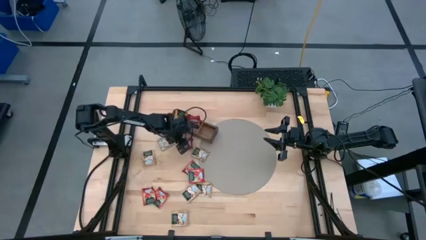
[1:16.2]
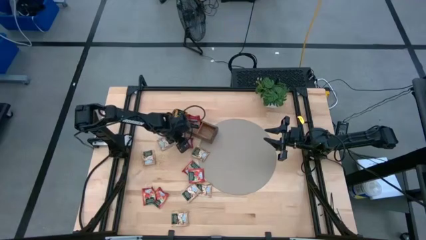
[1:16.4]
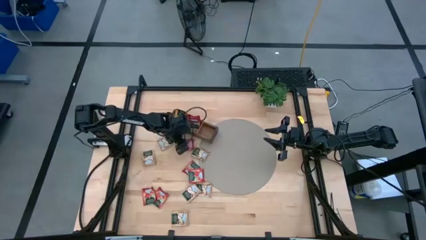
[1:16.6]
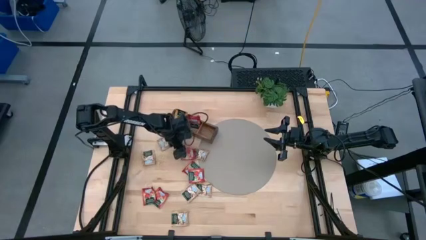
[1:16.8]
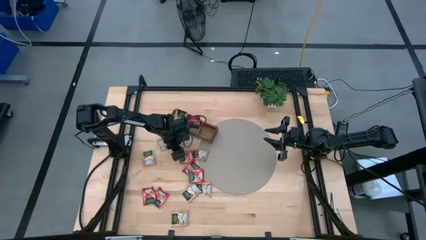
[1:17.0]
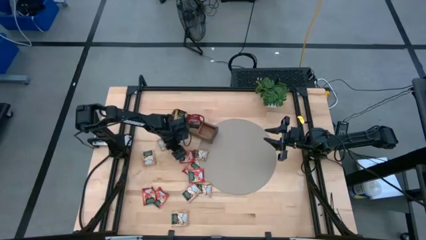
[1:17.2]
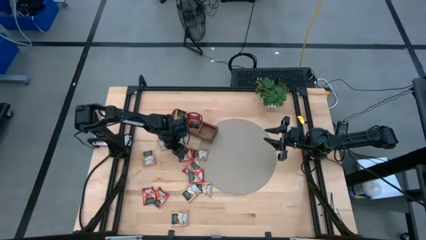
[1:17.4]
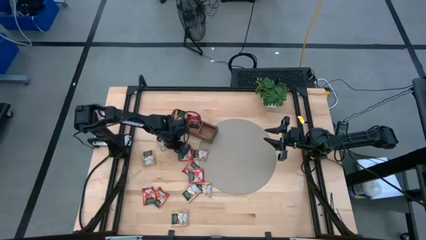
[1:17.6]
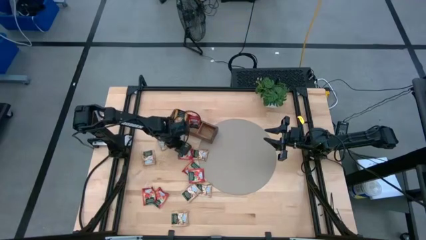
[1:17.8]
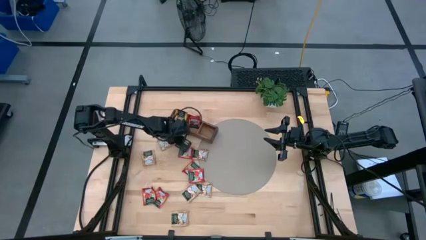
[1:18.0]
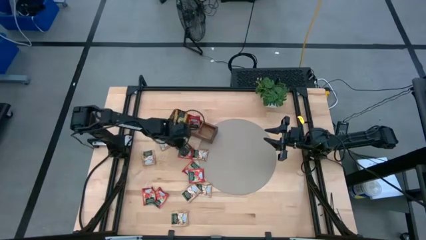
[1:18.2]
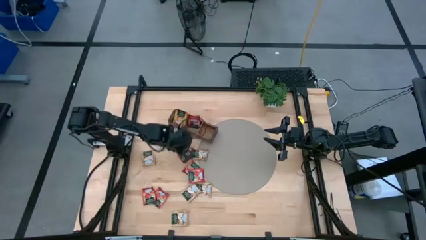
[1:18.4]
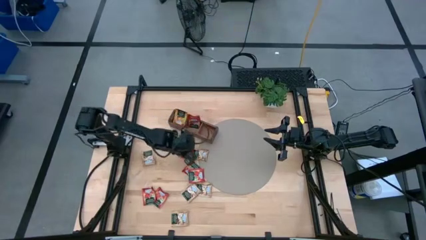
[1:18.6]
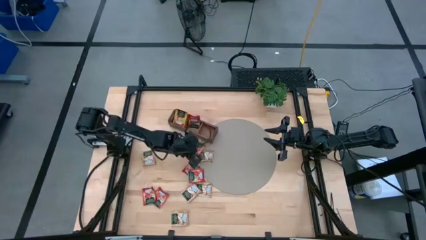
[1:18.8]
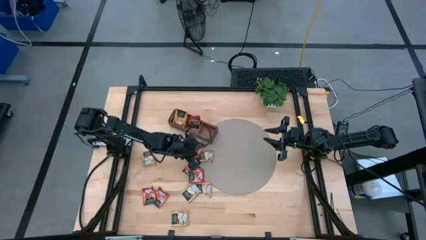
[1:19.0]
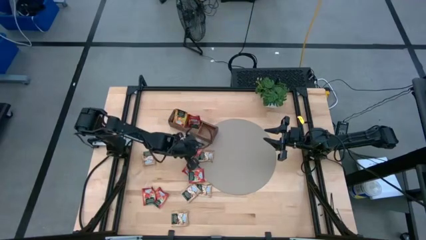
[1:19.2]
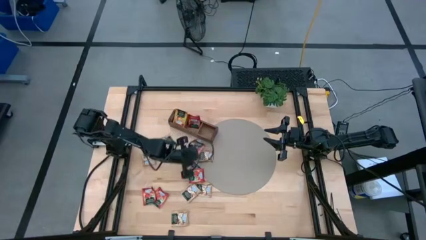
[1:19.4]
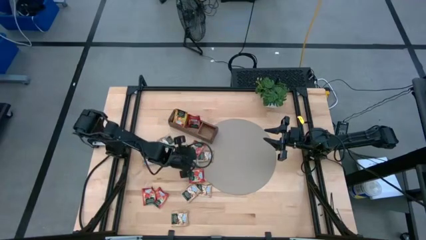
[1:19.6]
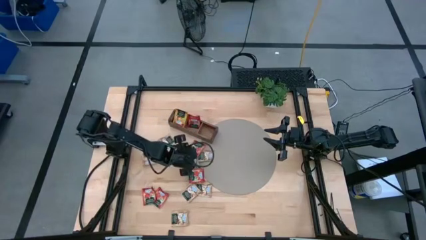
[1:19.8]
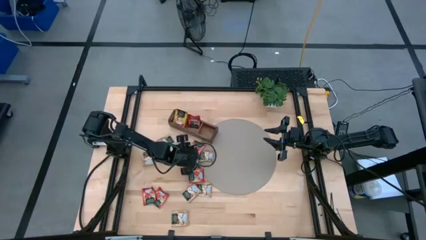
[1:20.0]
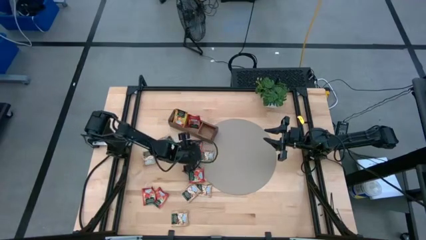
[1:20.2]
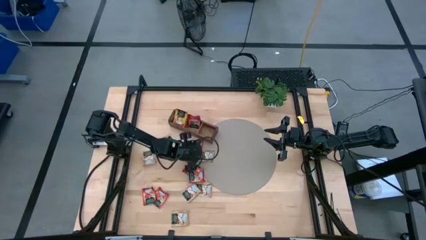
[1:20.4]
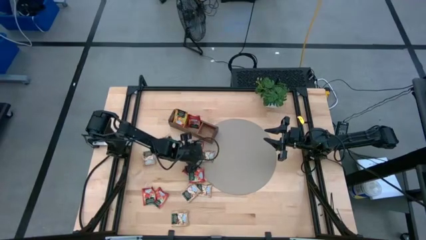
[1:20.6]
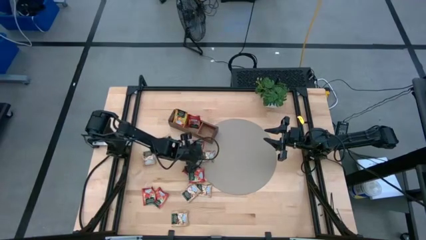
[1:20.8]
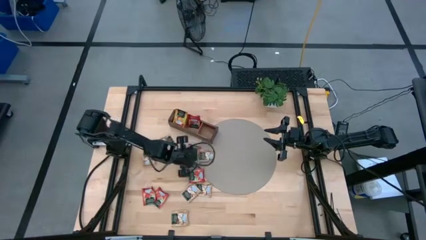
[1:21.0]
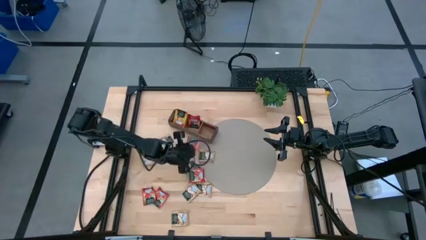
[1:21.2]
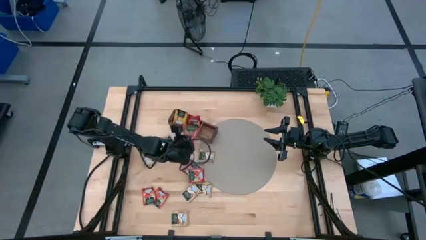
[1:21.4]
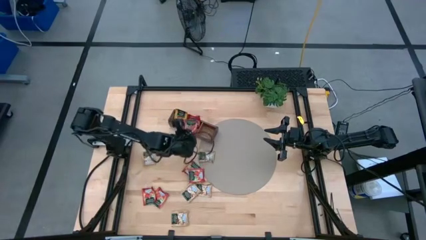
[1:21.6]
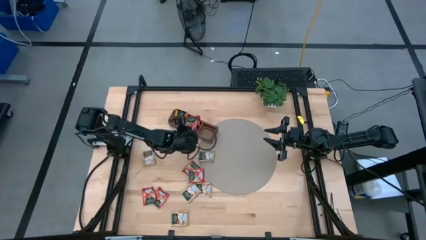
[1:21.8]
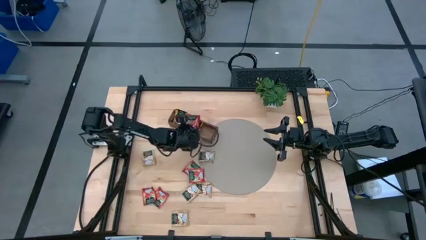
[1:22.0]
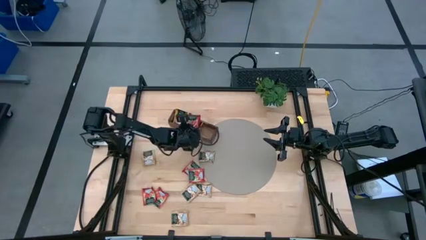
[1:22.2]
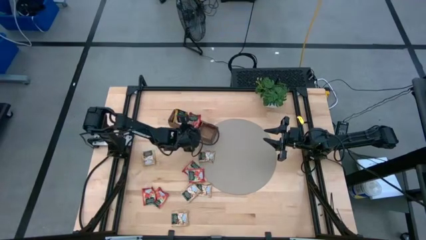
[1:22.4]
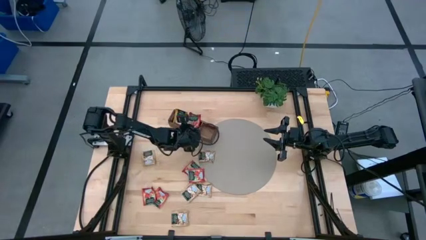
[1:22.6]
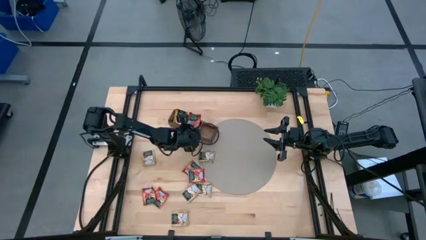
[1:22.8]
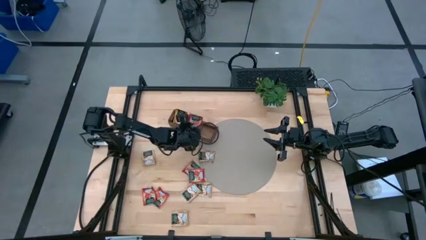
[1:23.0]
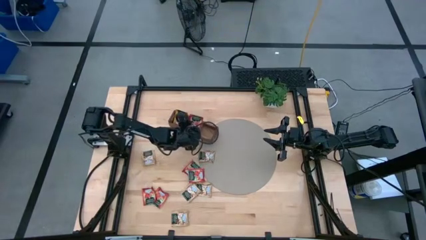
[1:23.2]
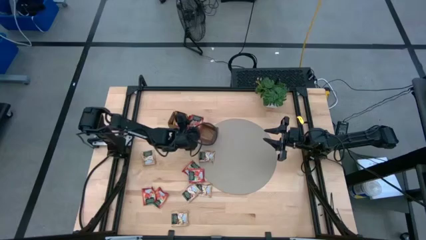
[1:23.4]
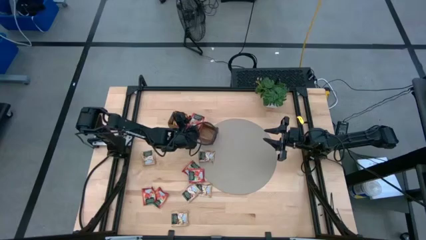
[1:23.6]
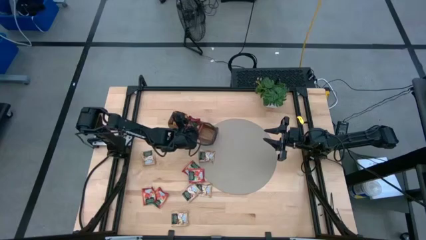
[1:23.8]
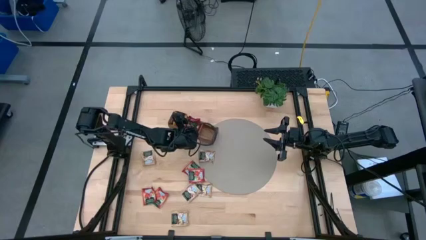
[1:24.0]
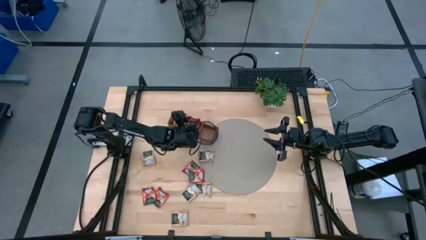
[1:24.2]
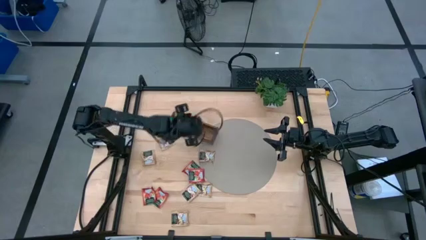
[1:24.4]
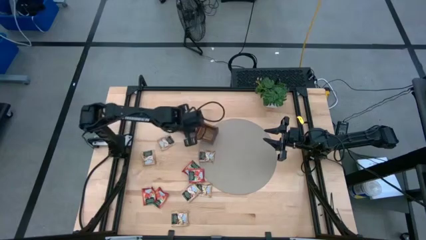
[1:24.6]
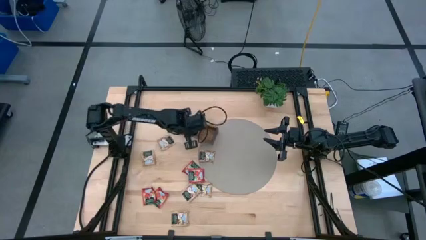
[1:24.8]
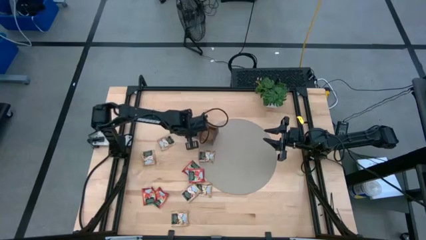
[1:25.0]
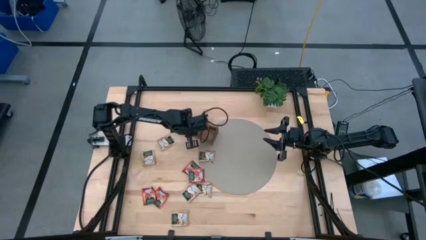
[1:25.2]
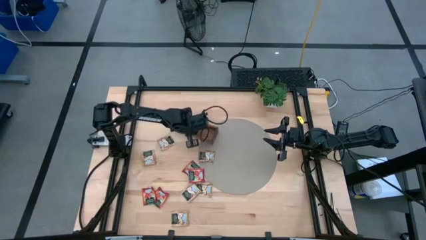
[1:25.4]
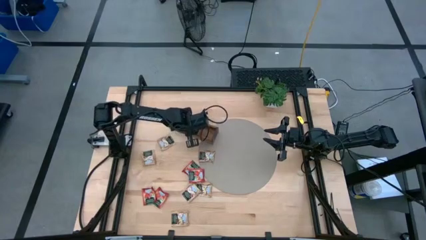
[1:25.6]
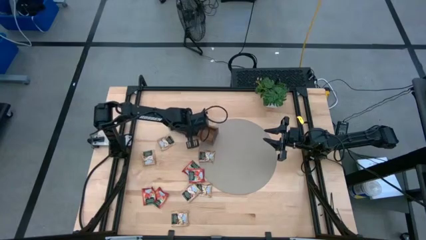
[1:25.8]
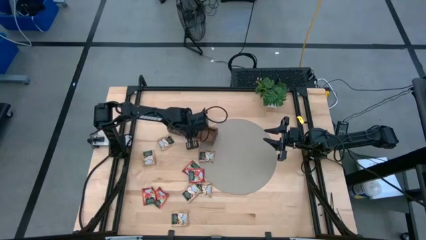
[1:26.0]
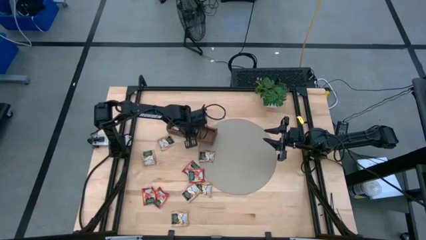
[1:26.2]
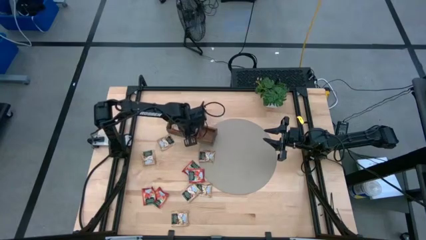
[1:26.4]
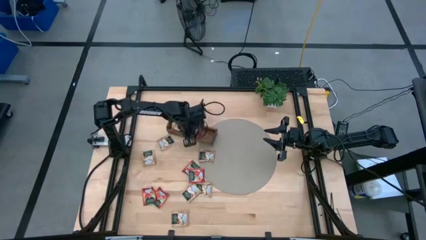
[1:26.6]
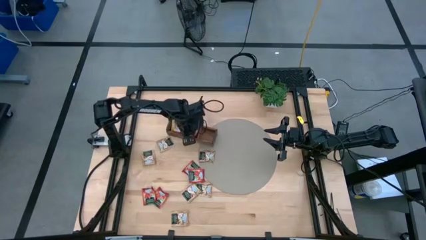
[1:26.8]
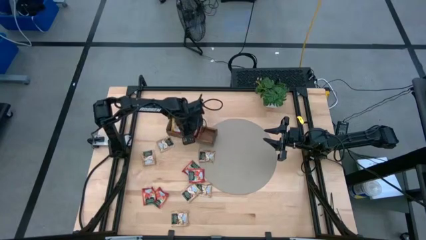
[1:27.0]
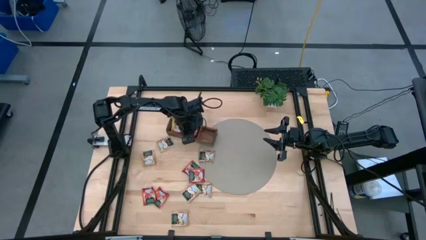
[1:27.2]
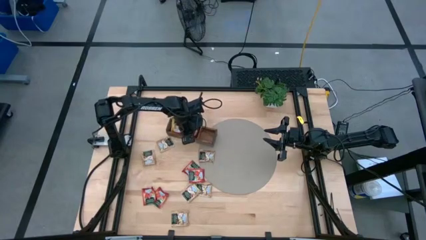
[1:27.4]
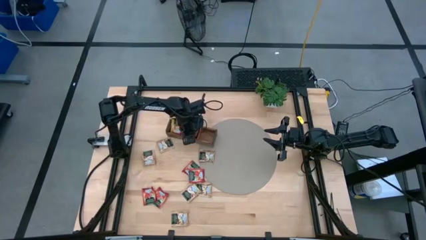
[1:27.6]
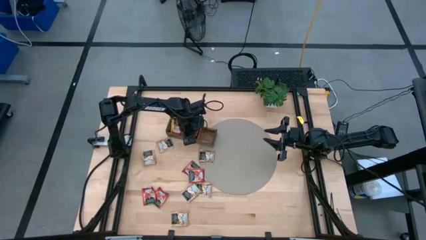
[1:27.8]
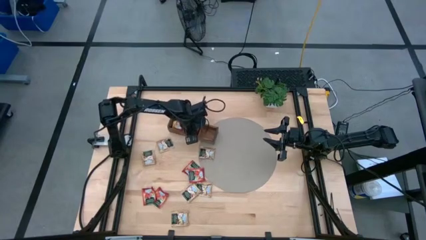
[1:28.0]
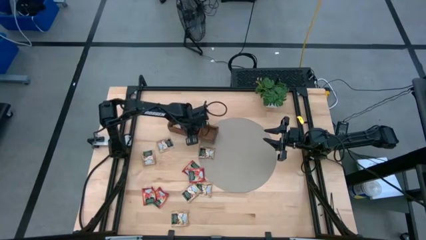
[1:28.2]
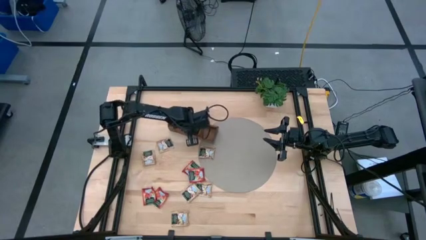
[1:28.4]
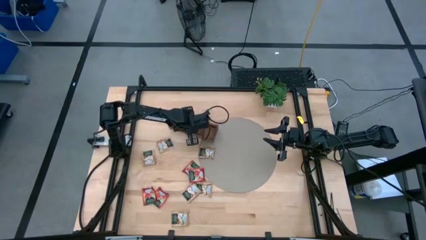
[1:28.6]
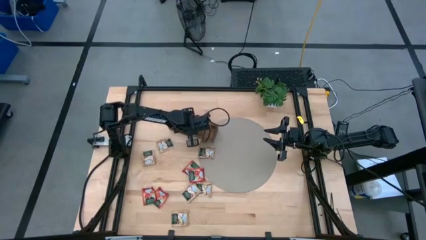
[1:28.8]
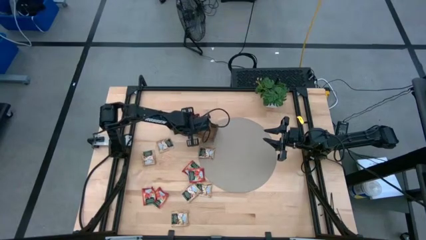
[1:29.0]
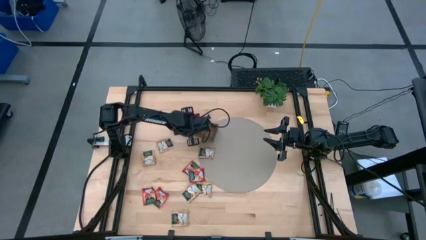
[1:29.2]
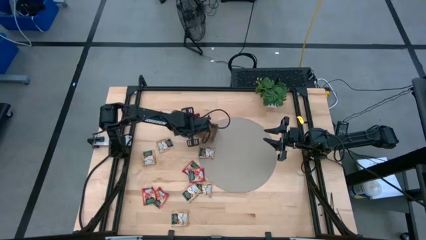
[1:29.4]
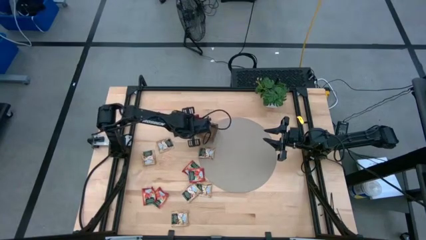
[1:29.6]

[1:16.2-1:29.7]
Task: Pick & Place Tea
Put the red tea bag into the middle section of the wooden organizer
